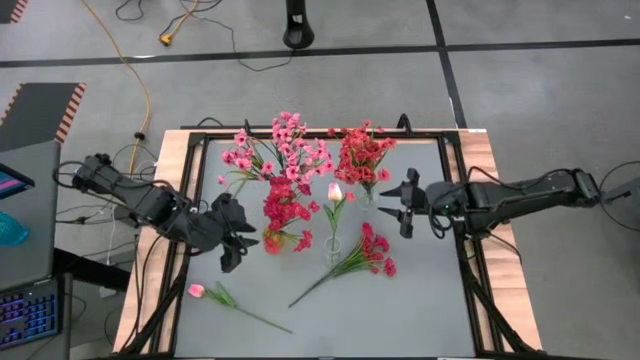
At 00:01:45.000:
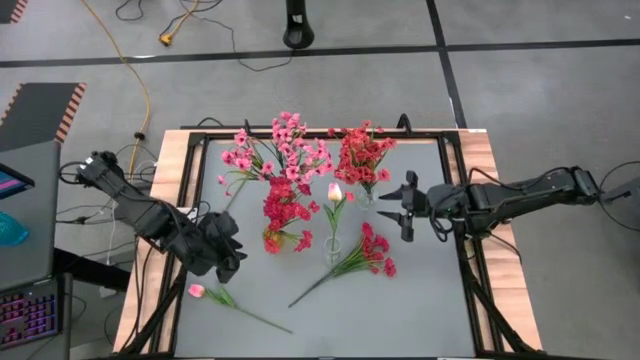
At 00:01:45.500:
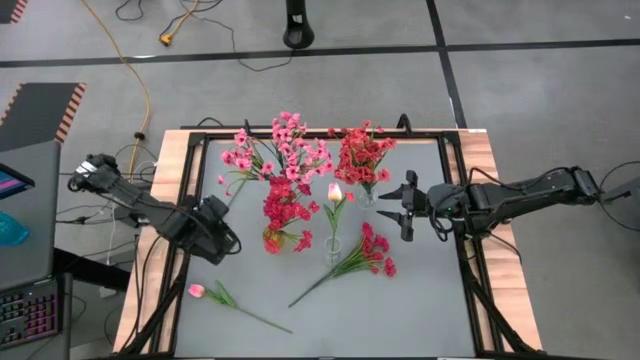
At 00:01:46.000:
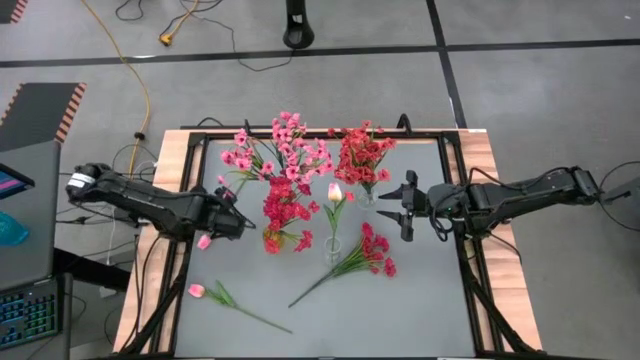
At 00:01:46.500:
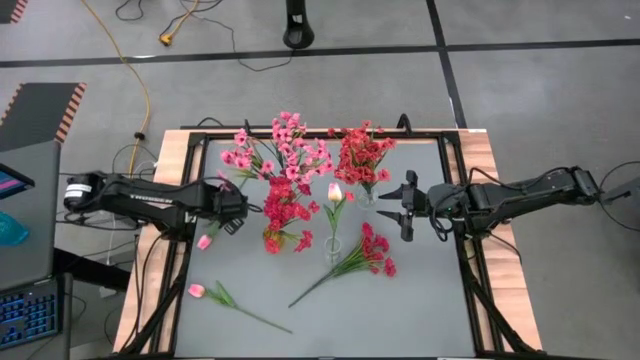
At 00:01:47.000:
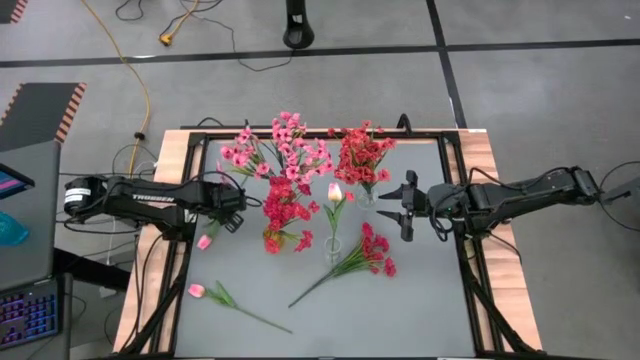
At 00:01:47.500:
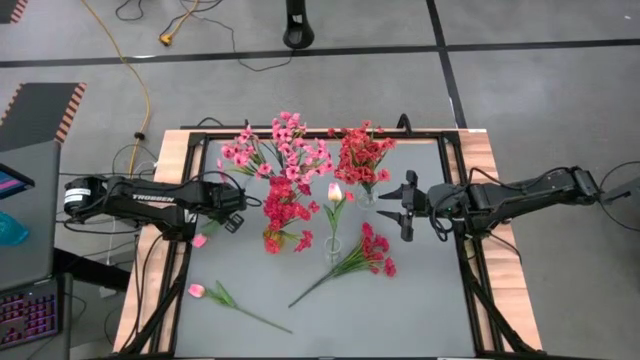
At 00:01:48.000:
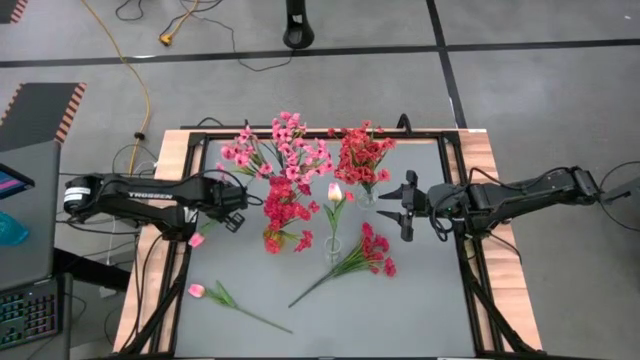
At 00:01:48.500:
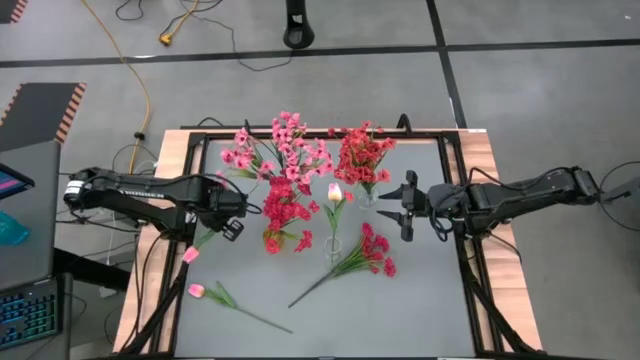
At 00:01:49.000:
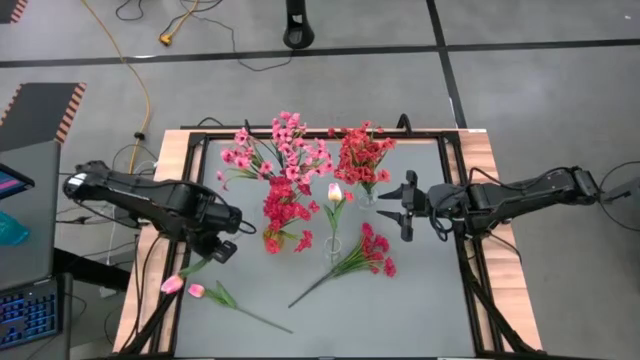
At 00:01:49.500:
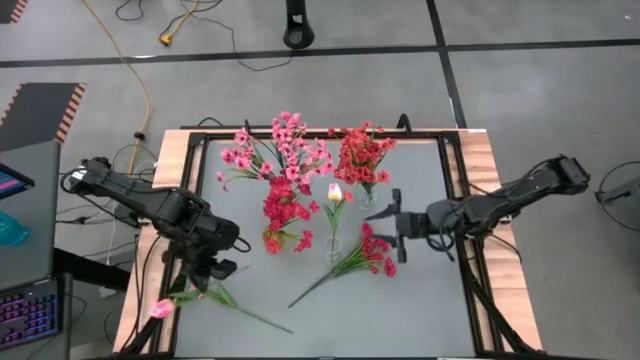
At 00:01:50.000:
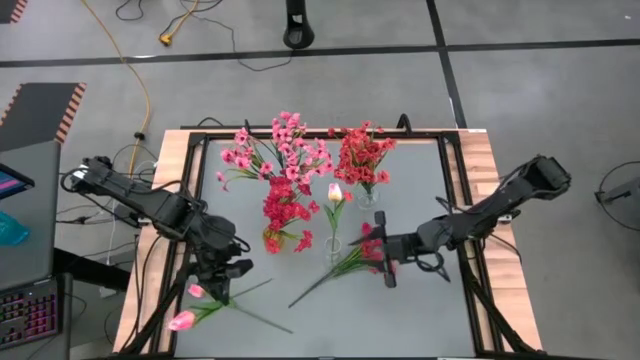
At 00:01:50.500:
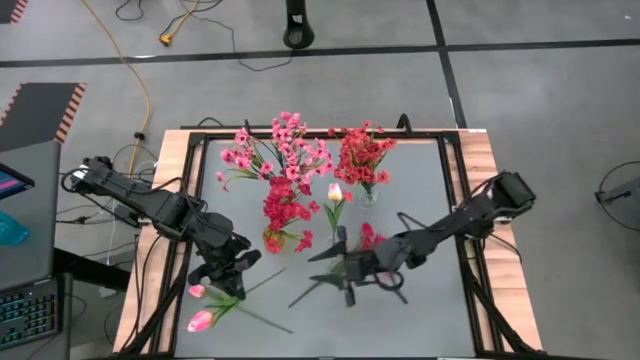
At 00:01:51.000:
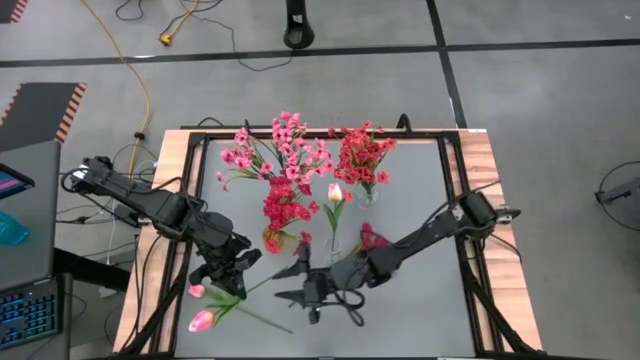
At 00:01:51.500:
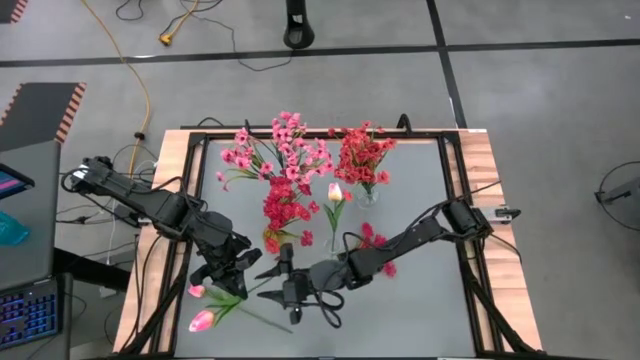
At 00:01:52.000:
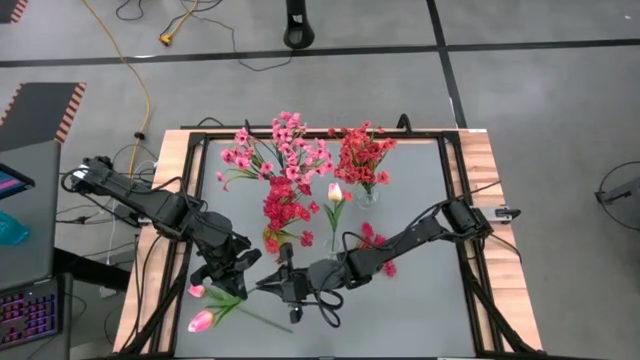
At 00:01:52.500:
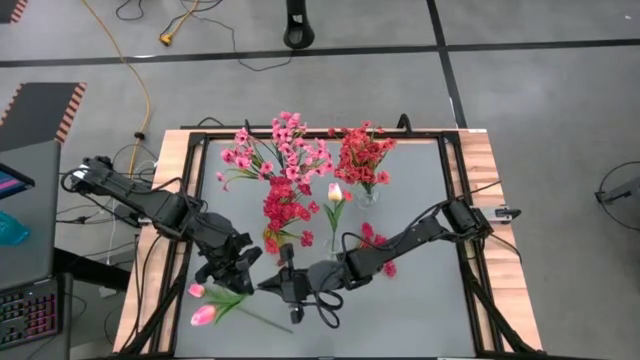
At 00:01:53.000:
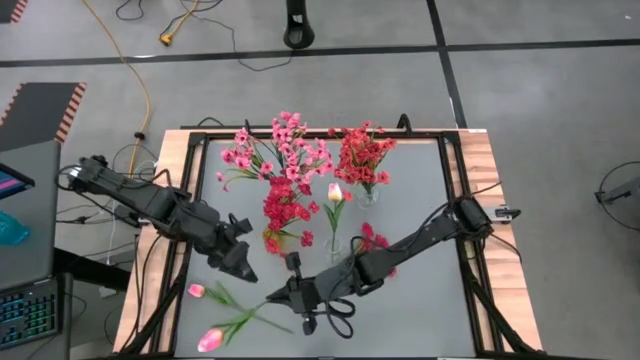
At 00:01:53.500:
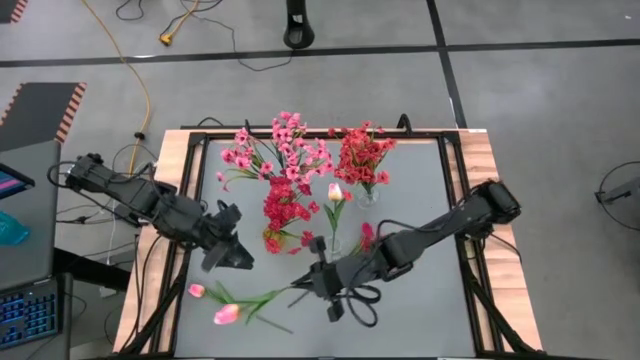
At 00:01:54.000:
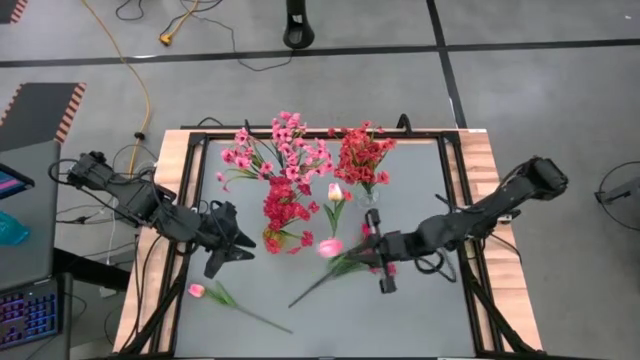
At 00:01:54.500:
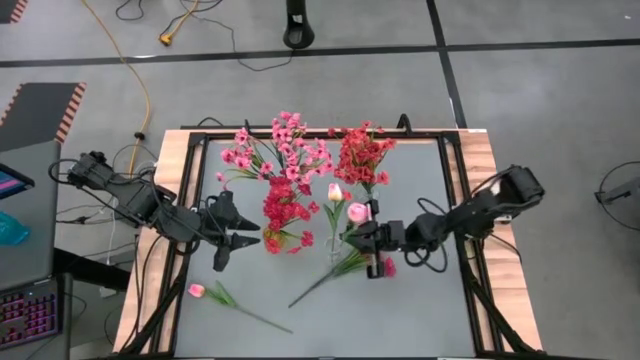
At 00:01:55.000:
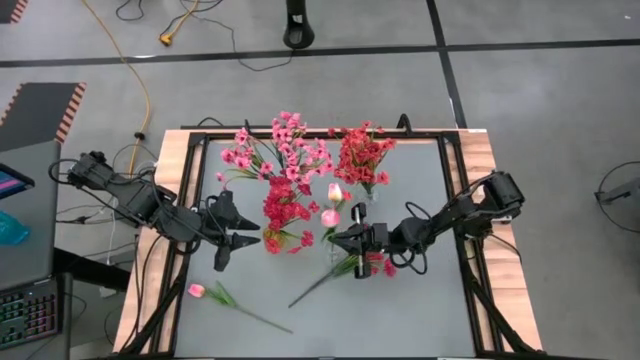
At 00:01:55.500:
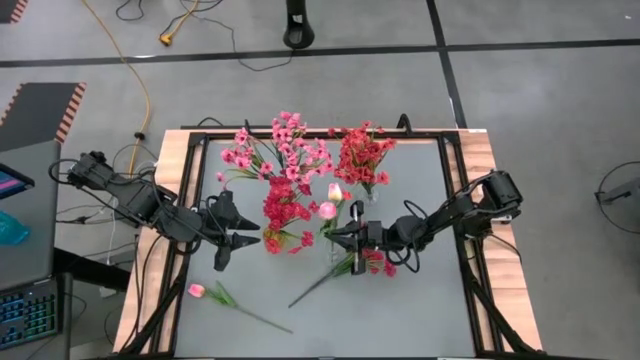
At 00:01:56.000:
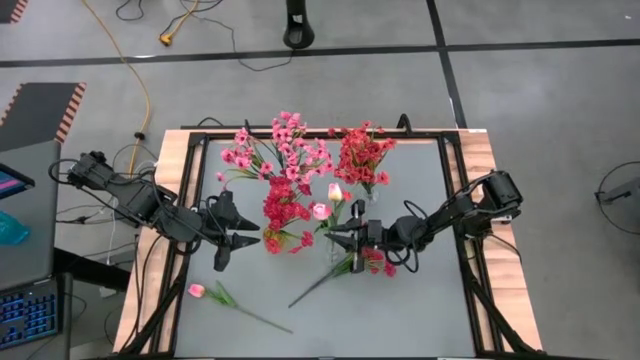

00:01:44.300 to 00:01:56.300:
Task: Sort flowers into vase by color
Put the top light pink flower into the bottom transparent vase

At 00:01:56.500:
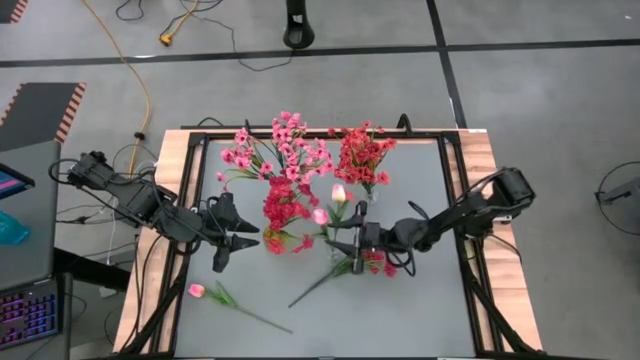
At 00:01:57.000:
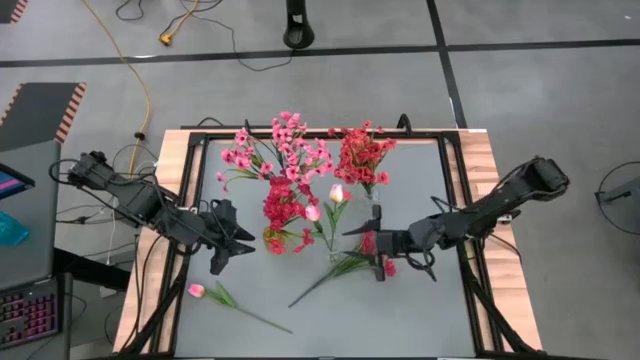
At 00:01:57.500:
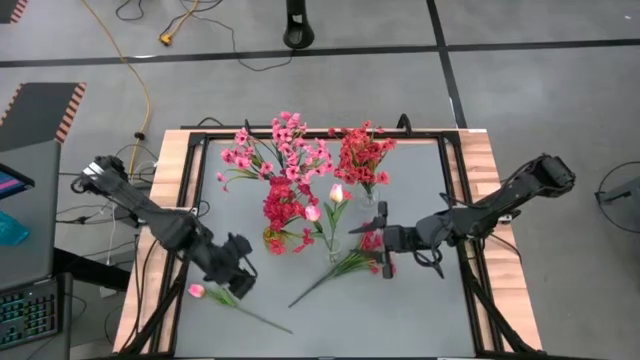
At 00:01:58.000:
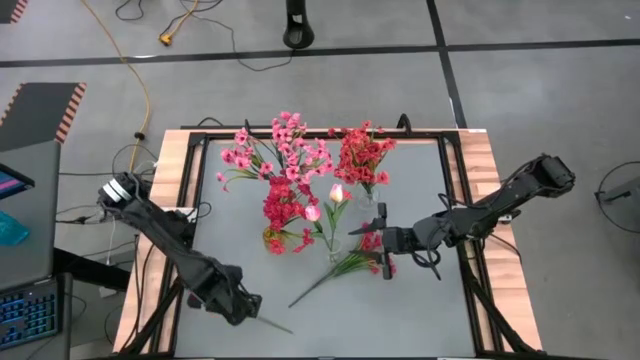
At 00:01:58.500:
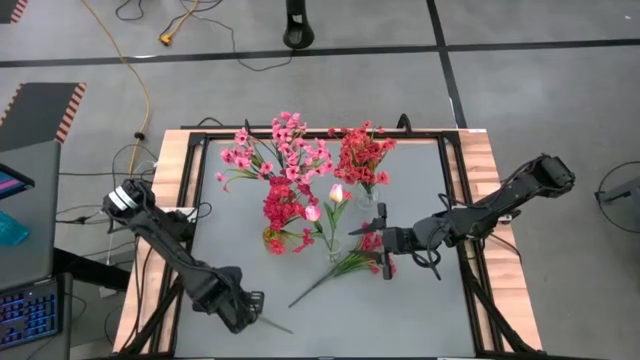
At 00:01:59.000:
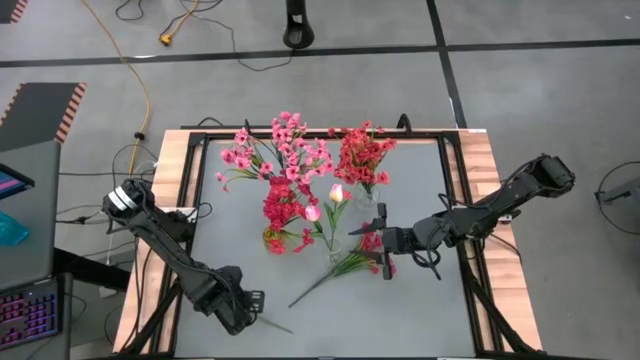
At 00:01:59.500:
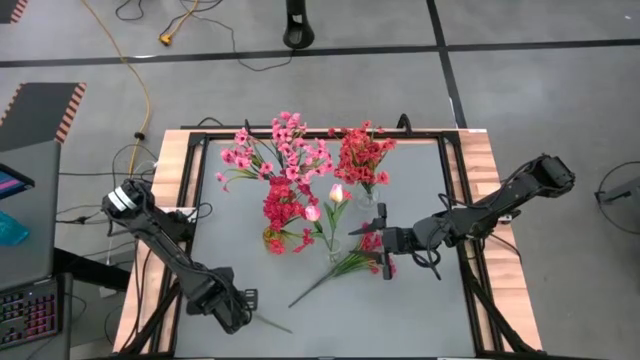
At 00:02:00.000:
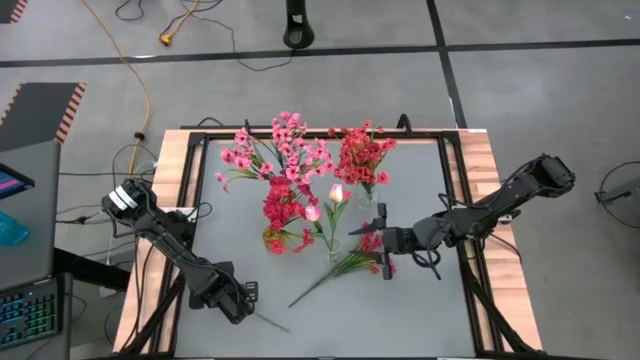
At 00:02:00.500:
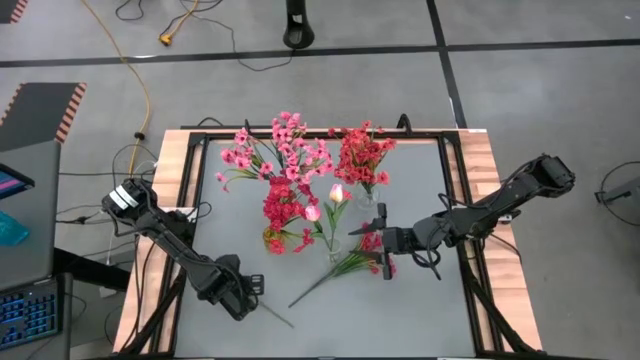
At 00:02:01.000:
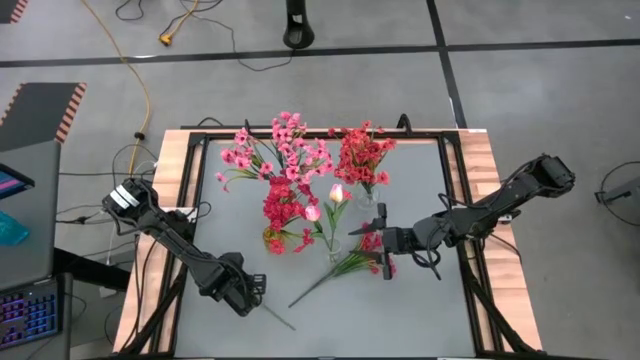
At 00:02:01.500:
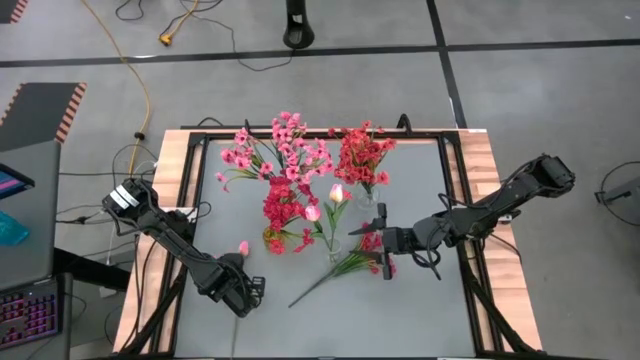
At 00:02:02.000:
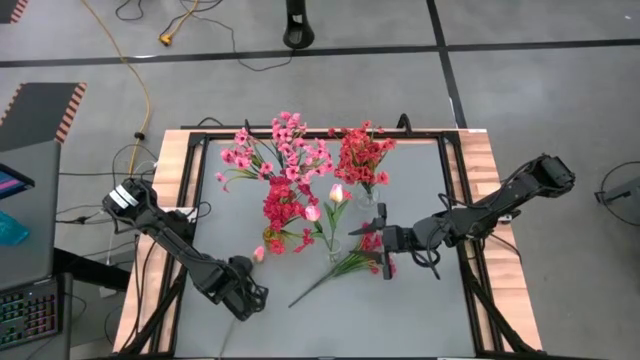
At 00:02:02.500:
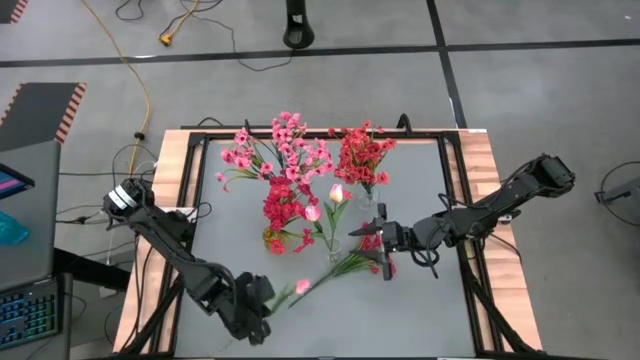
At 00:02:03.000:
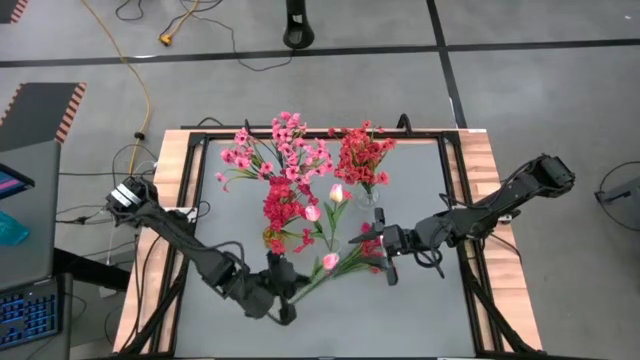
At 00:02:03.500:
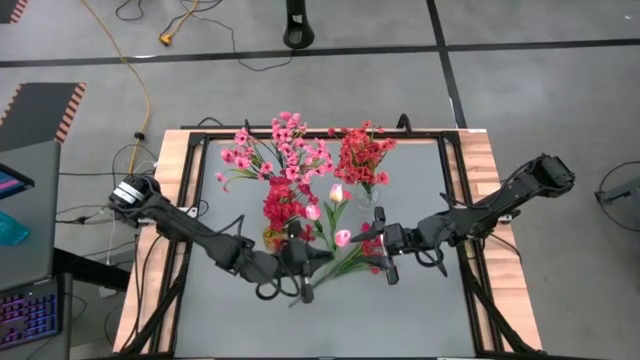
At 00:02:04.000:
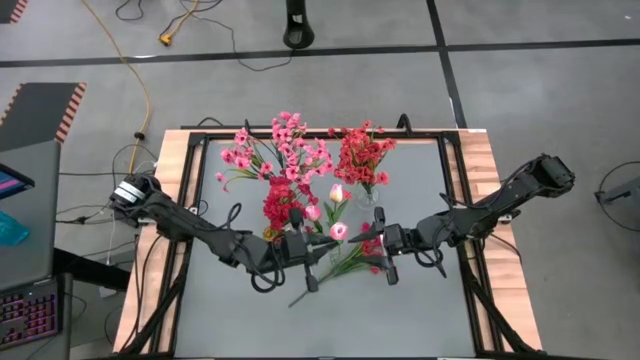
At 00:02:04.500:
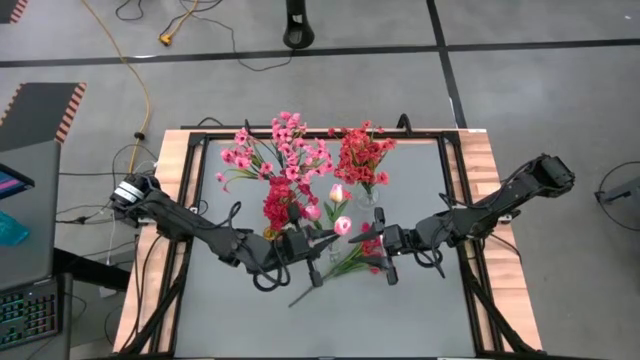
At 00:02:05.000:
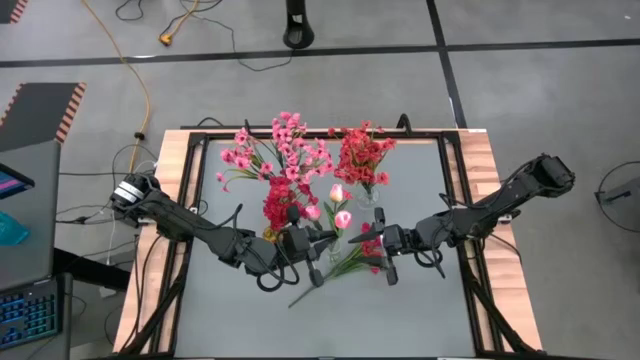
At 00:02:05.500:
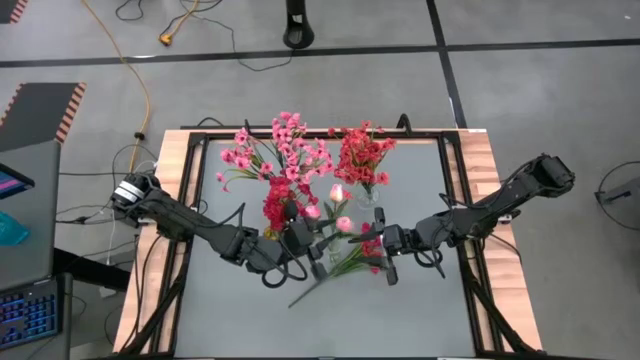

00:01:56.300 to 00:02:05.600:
Put the light pink flower into the bottom transparent vase

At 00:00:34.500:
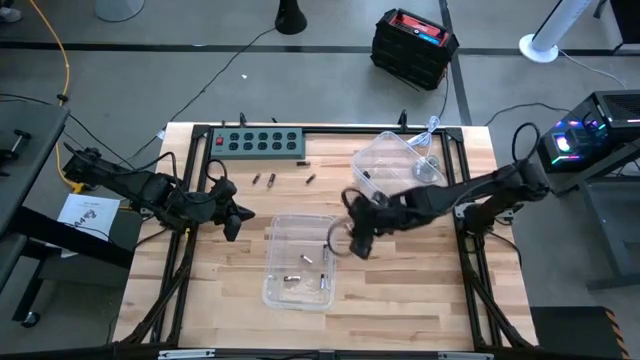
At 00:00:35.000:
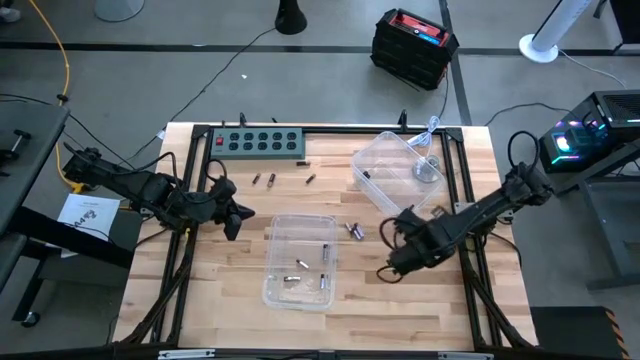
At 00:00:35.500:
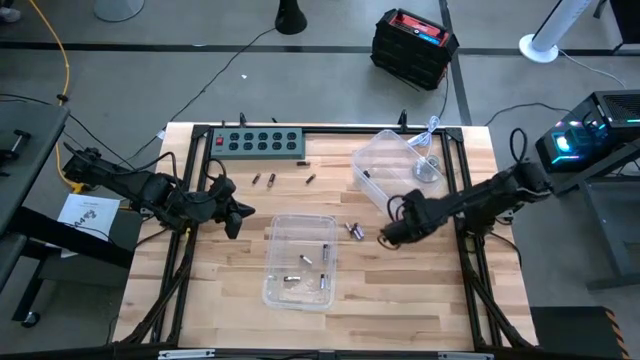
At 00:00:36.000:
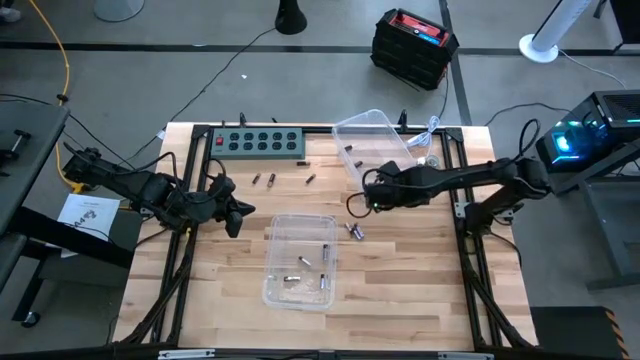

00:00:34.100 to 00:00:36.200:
Task: Sort batteries
Move the right transparent bin to the top center of the table
